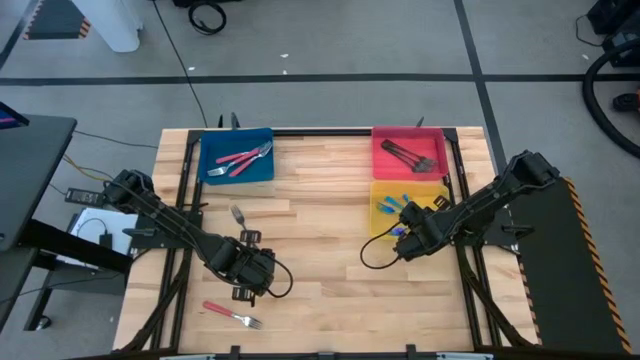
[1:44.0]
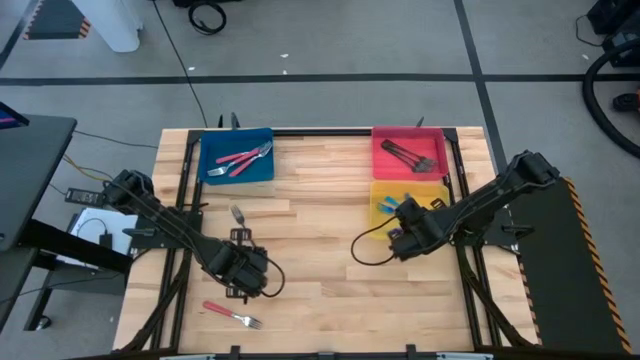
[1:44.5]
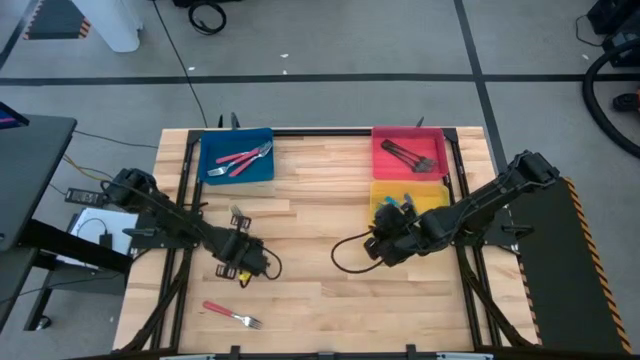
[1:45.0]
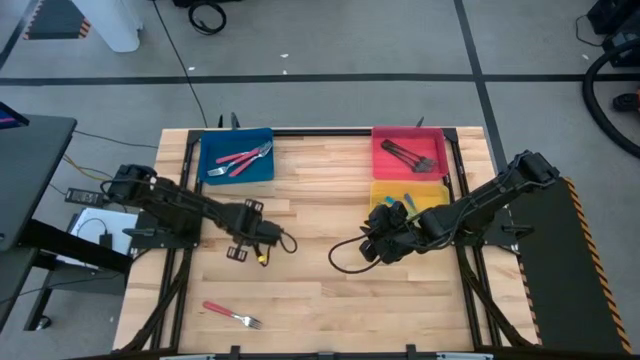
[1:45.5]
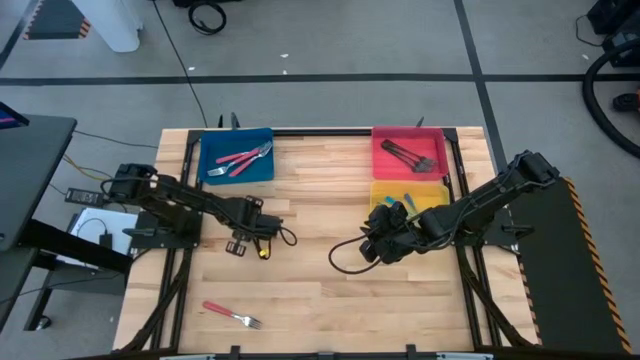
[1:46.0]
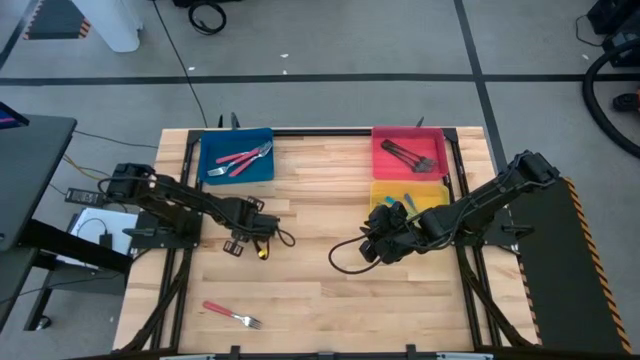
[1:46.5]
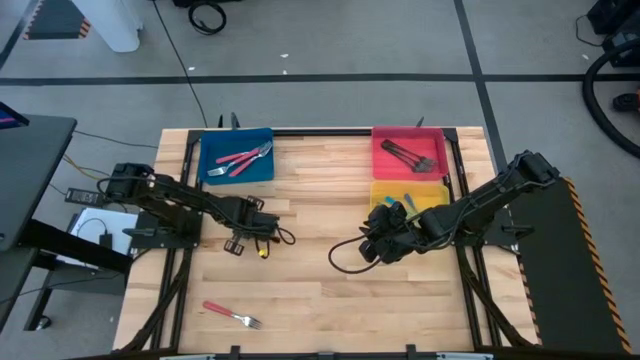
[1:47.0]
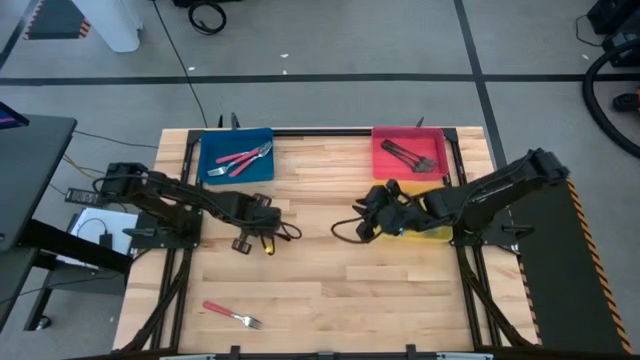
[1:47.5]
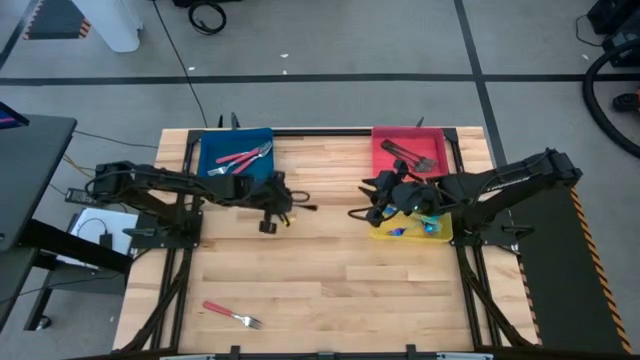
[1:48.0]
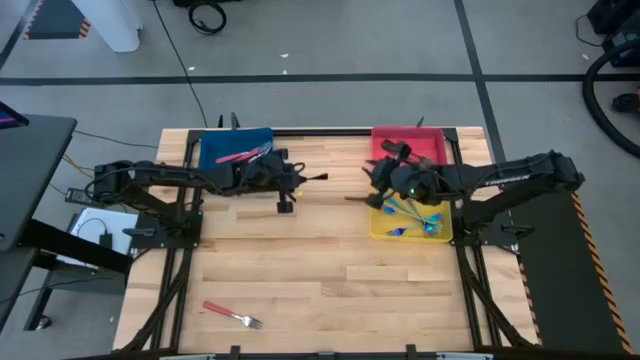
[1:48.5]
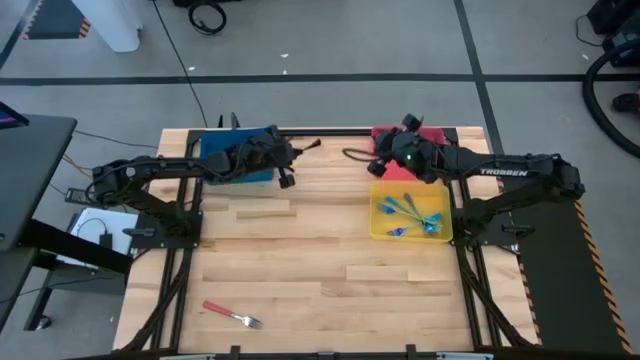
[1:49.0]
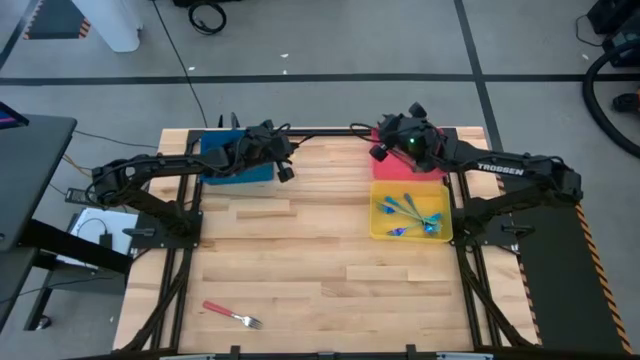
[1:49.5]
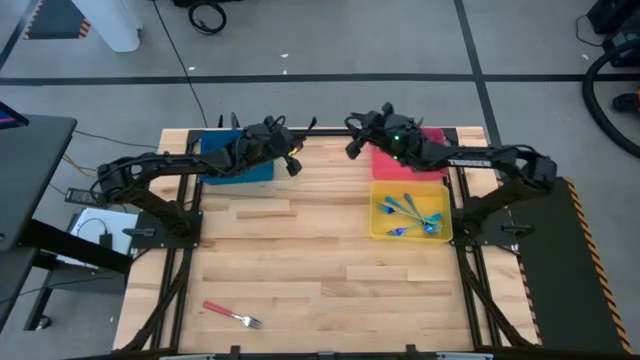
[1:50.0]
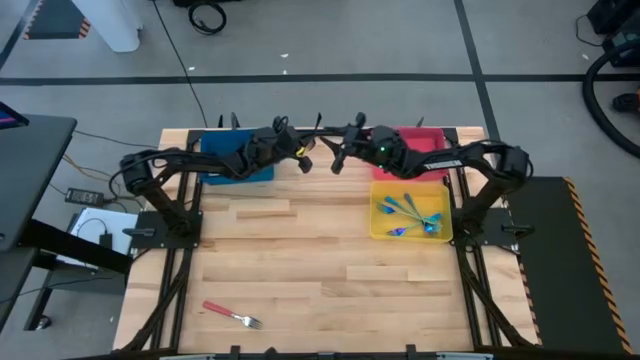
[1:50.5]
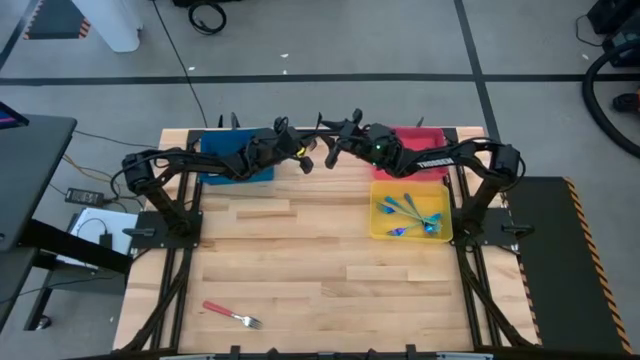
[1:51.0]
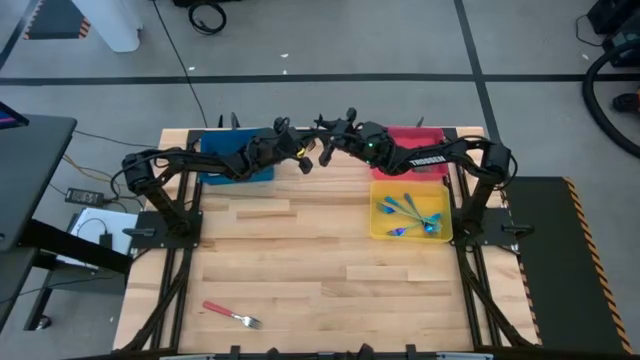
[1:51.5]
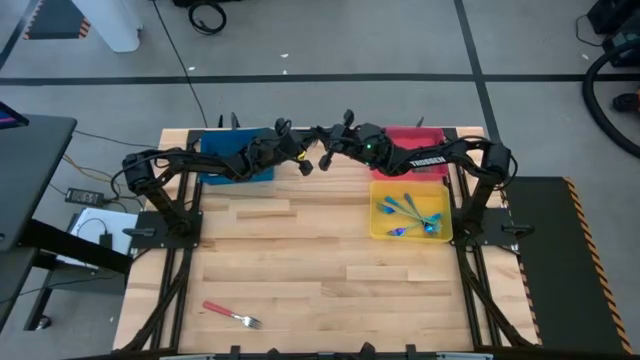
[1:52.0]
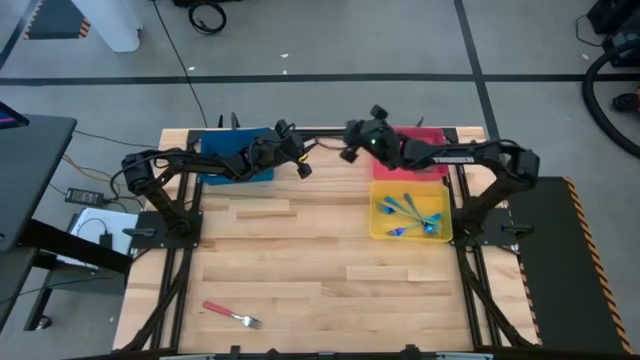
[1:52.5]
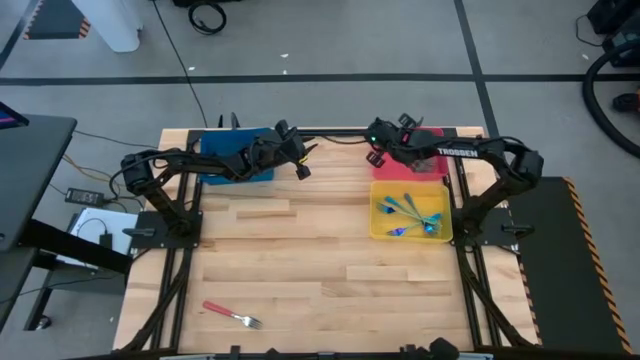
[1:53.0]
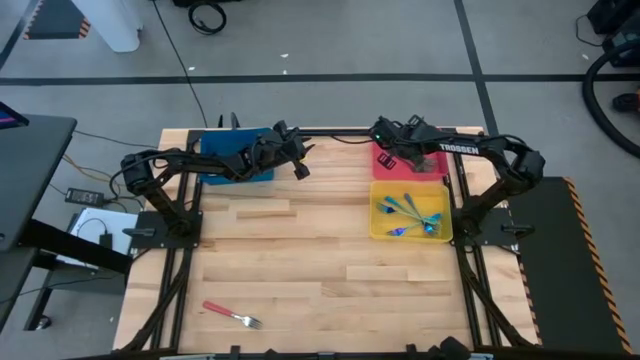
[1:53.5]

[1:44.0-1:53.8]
Task: Sort silverware by color (type)
Put the black fork into the red bin

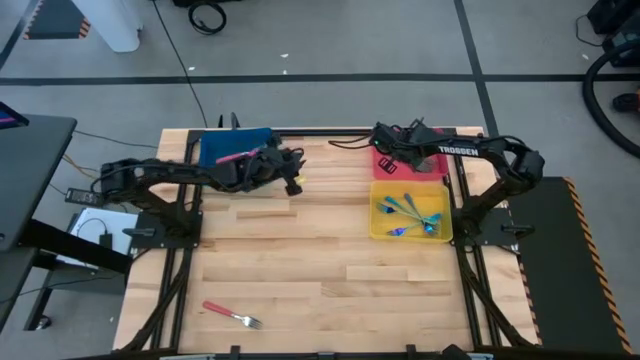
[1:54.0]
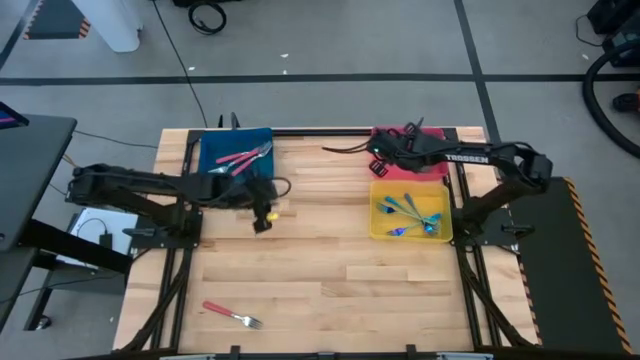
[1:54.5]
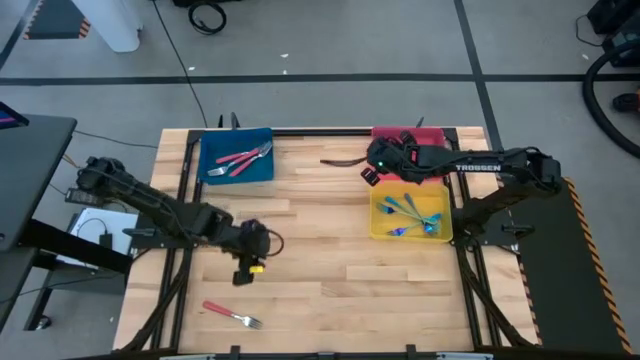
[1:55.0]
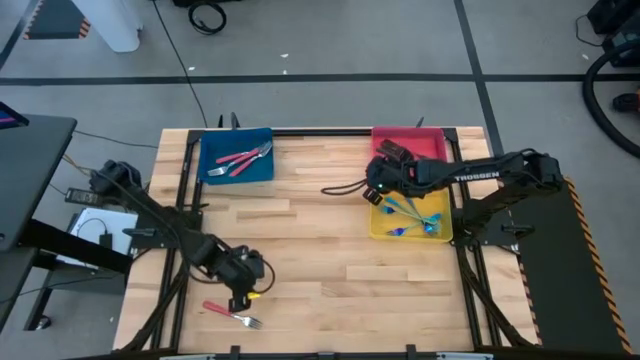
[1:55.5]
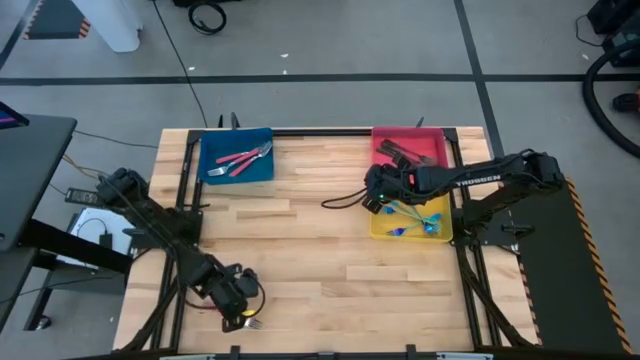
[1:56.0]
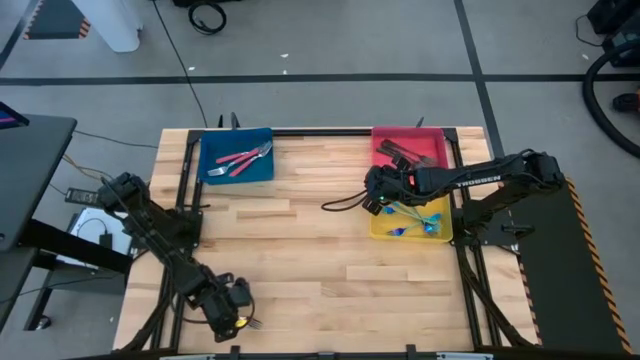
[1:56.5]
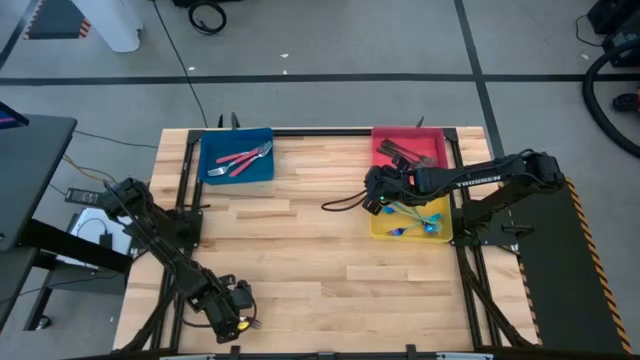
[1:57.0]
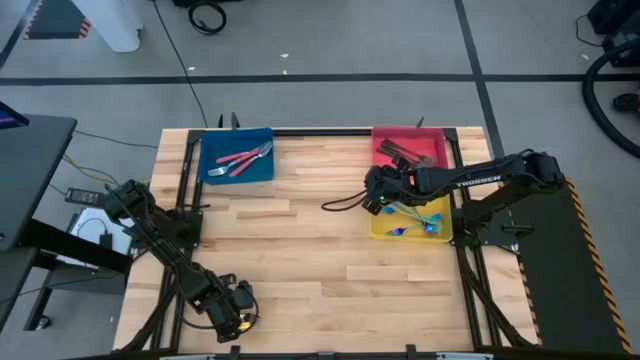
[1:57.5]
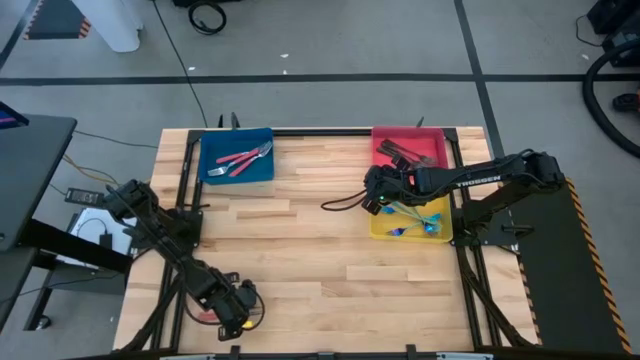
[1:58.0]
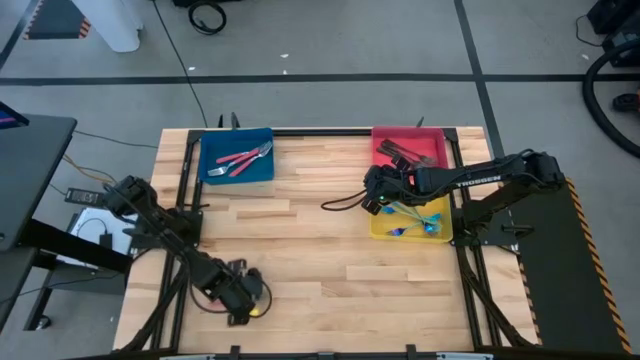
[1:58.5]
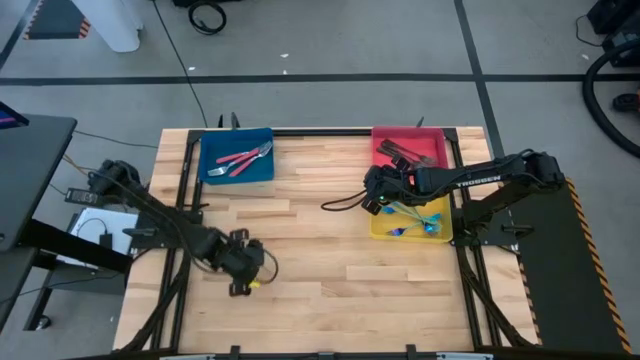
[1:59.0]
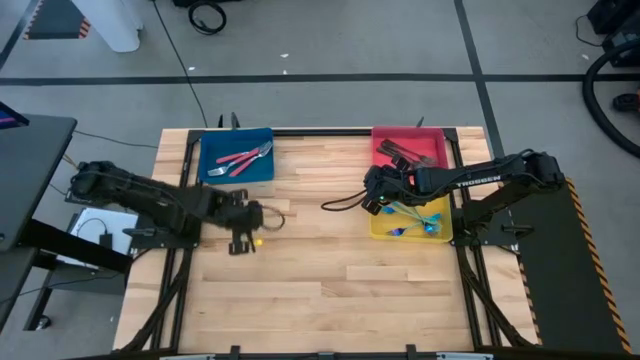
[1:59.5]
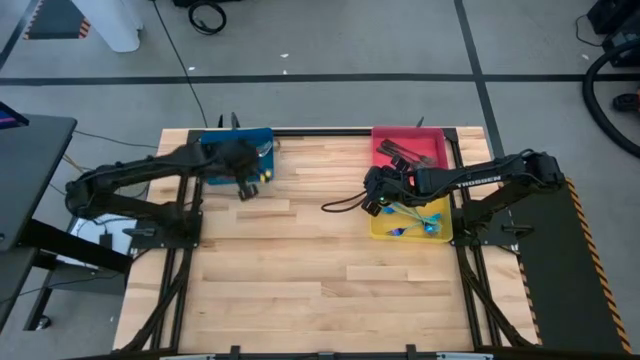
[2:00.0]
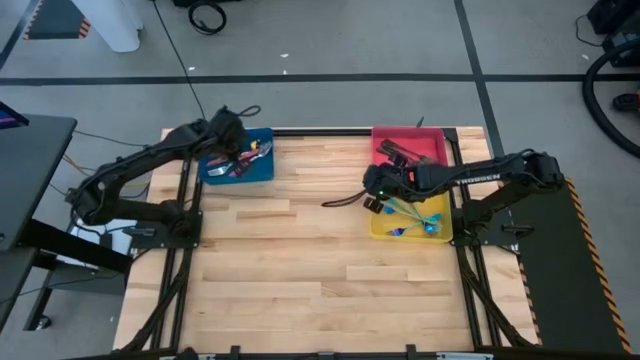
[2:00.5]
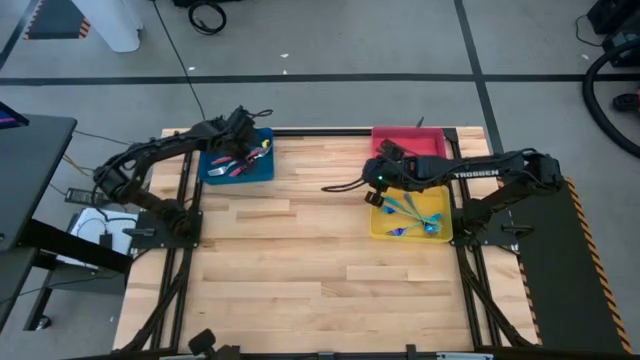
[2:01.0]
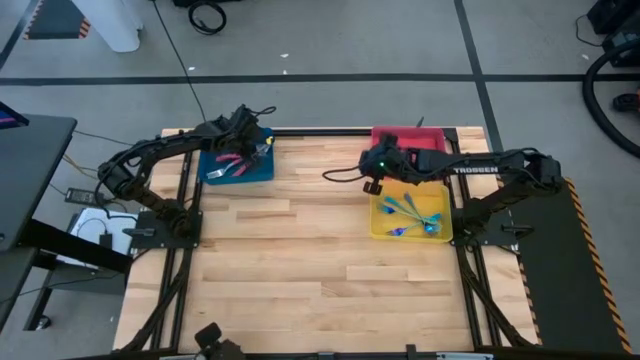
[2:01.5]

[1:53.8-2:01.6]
Put the pink fork into the blue bin

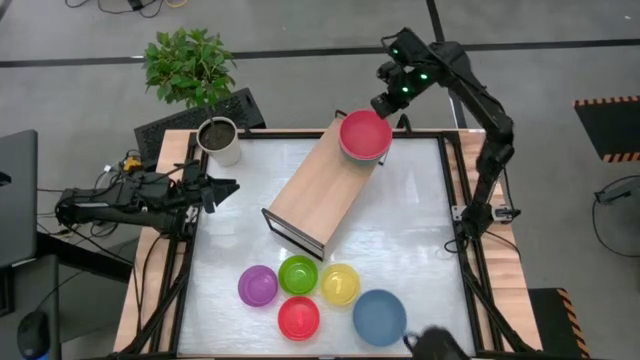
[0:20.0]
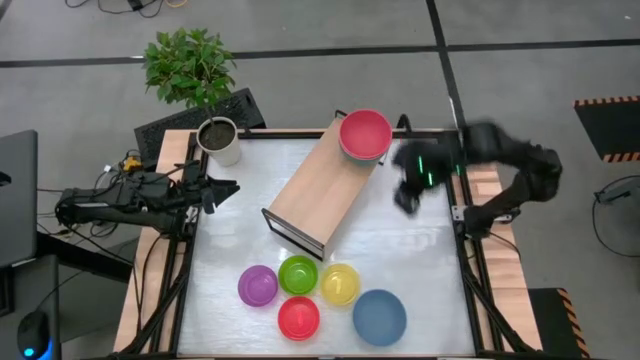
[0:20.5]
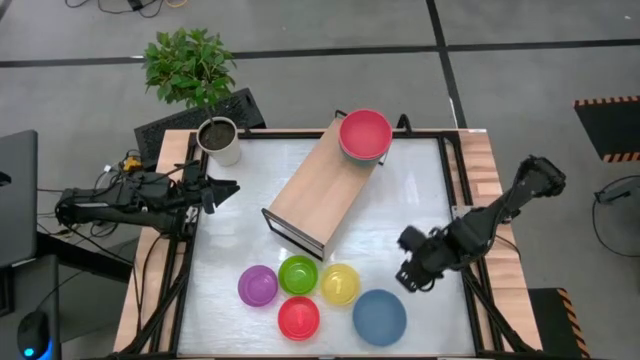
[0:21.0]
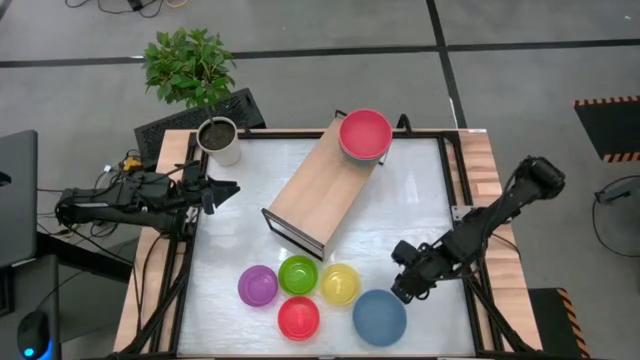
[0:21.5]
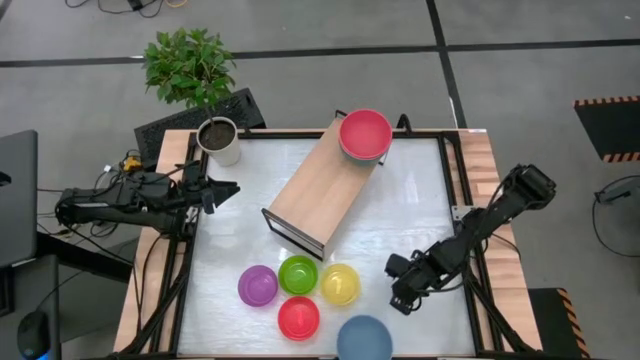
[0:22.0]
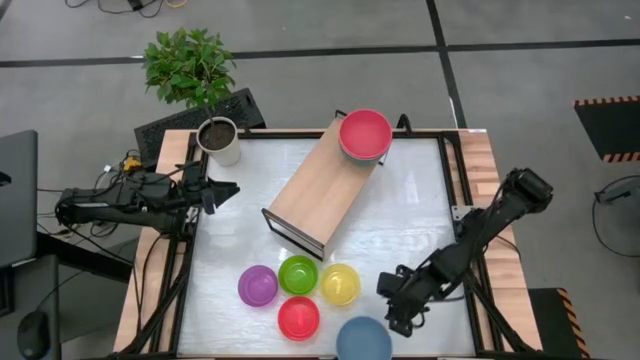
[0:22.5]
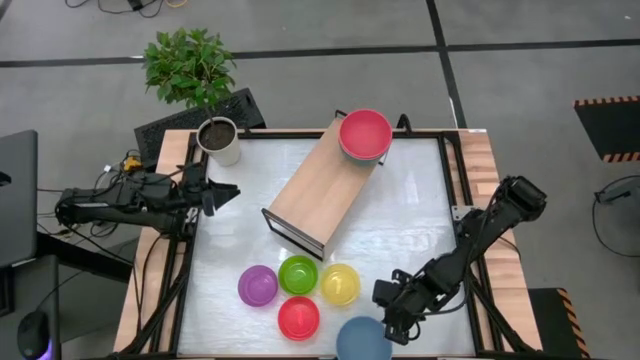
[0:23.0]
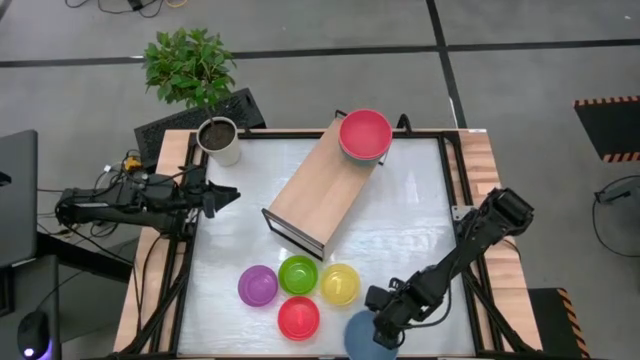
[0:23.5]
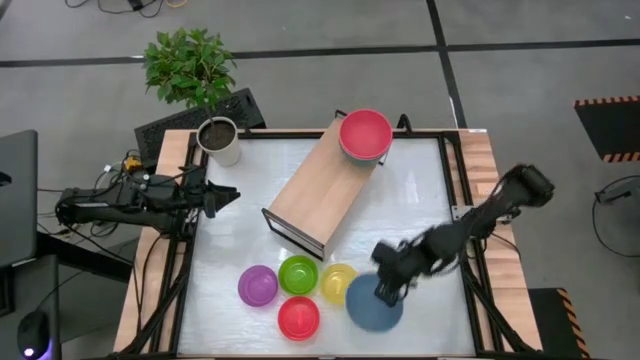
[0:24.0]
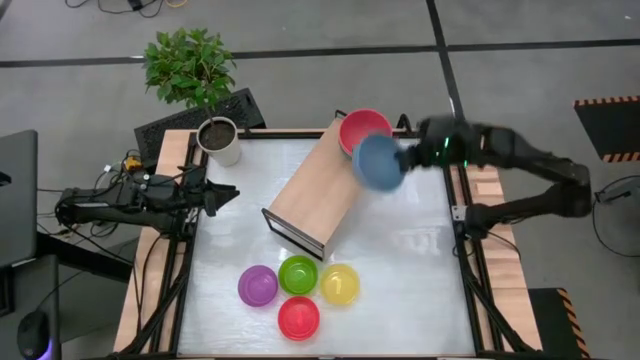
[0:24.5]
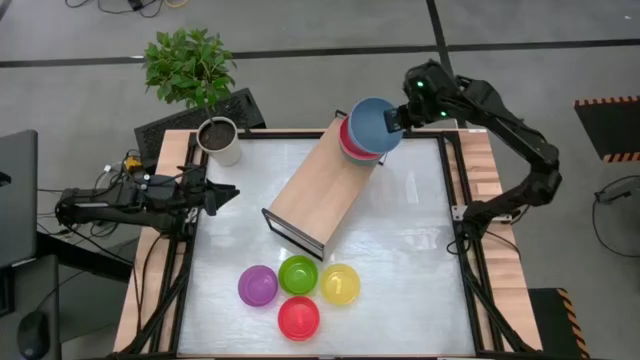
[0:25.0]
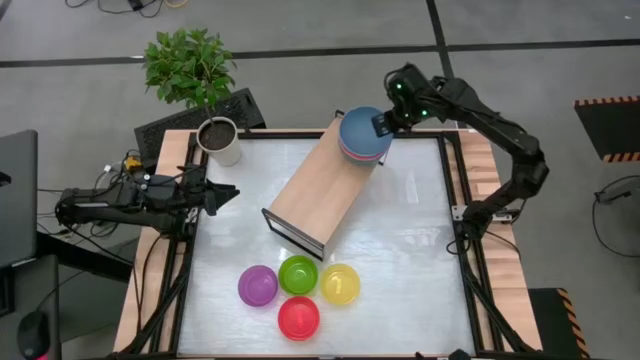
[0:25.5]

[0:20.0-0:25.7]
Task: Place and stack bowls onto a shelf
Stack the blue bowl on the orange bowl
